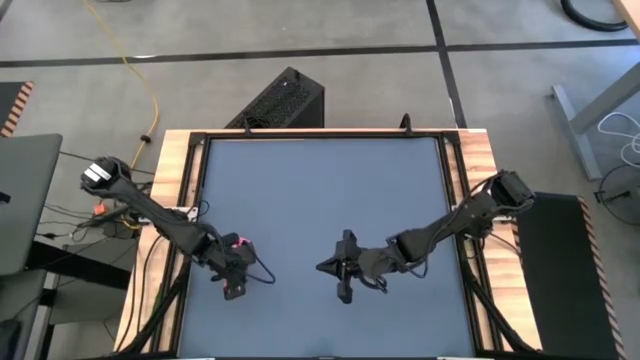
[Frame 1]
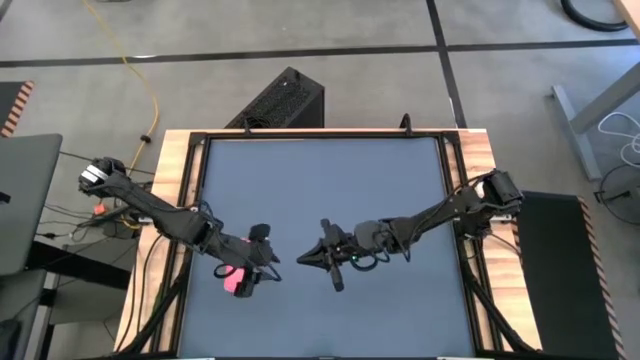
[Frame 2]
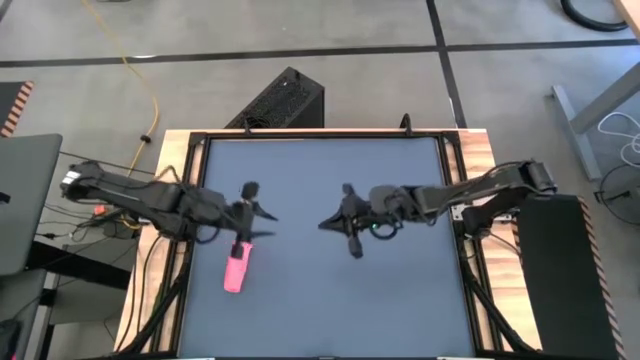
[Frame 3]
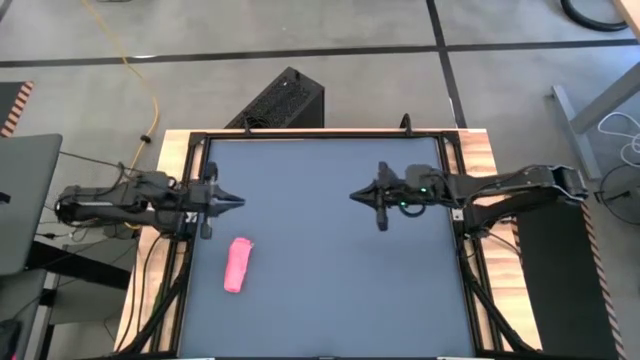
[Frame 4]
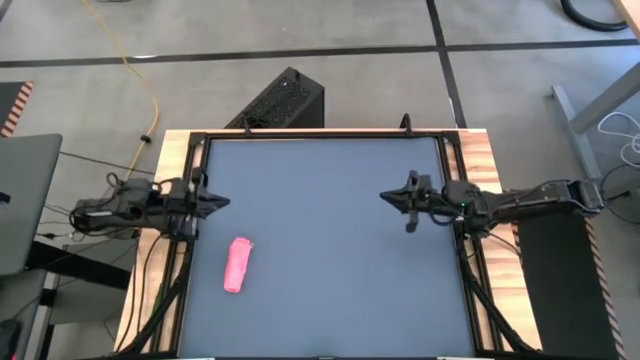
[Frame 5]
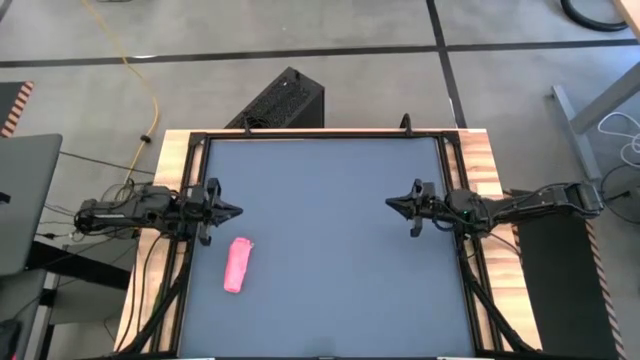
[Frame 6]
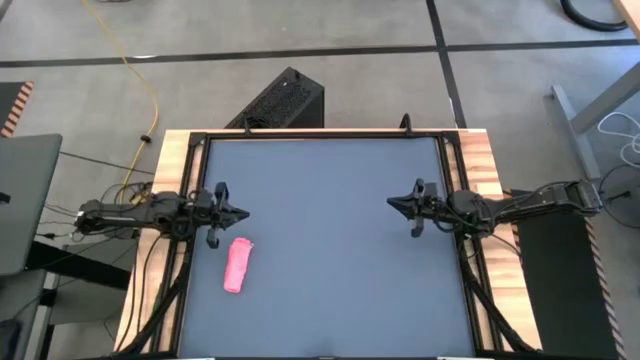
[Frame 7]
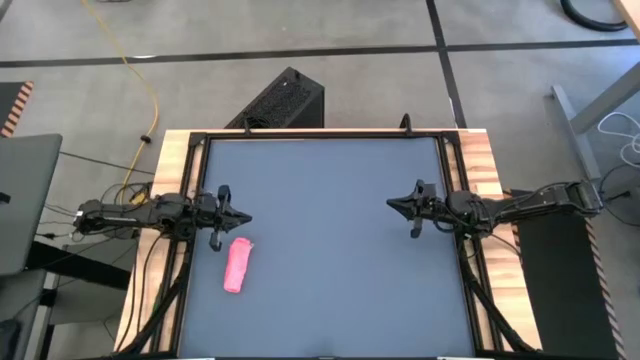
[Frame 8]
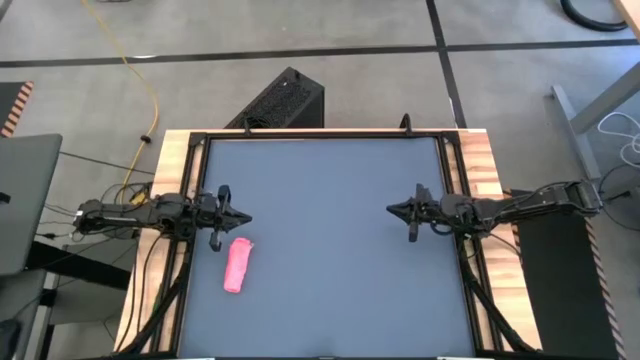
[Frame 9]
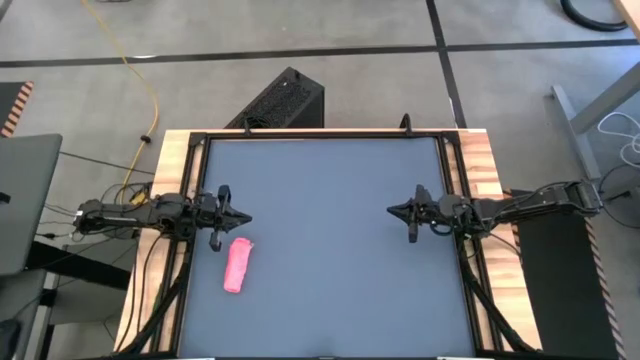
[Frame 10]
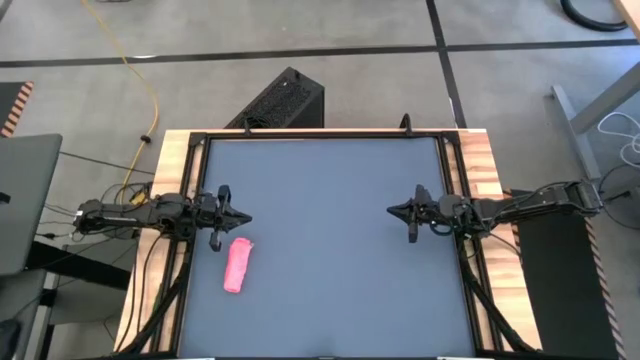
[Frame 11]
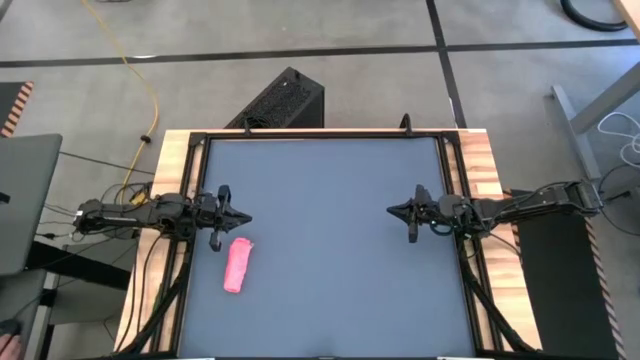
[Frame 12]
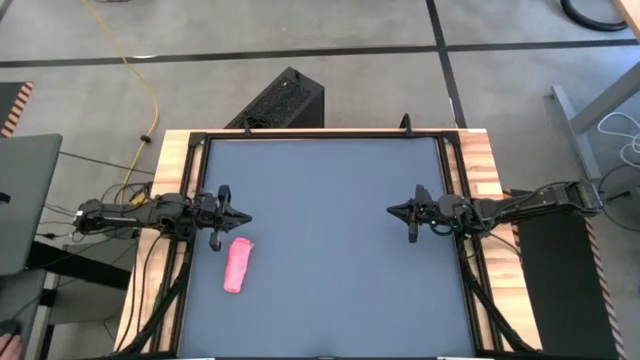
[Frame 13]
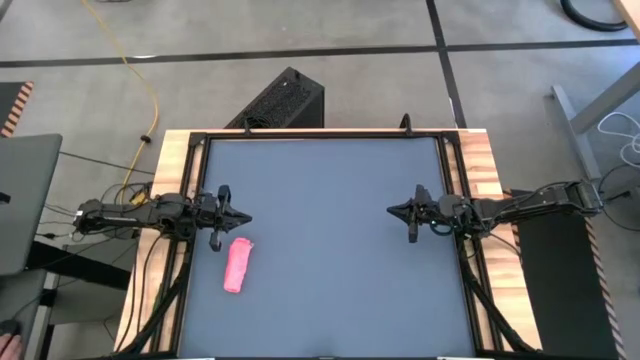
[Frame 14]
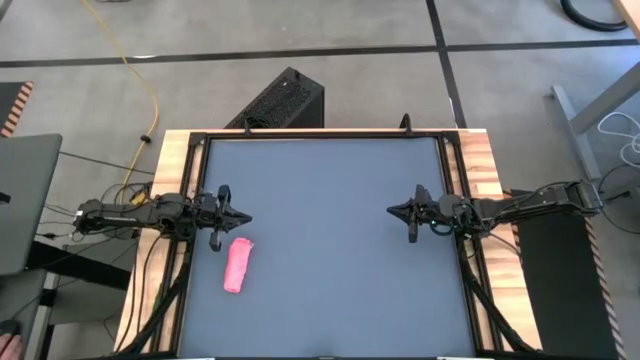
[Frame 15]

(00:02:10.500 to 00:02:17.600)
Task: Roll towel
Return to Home Position

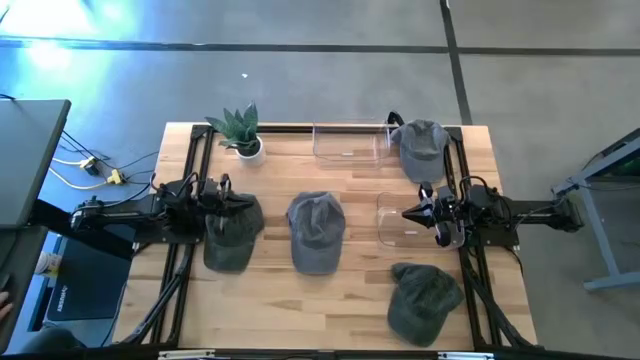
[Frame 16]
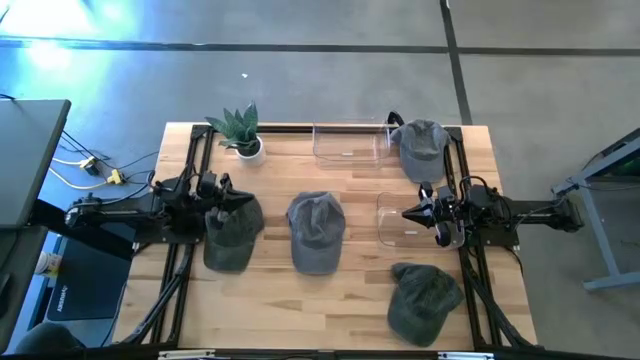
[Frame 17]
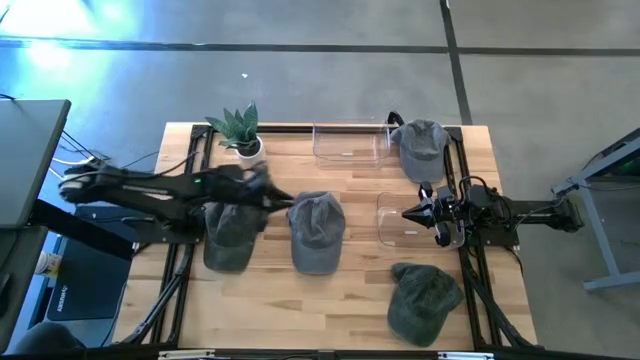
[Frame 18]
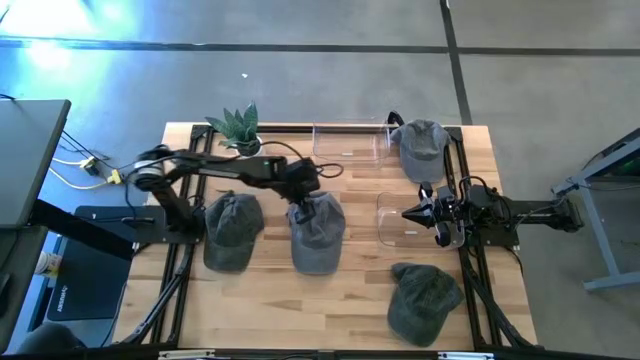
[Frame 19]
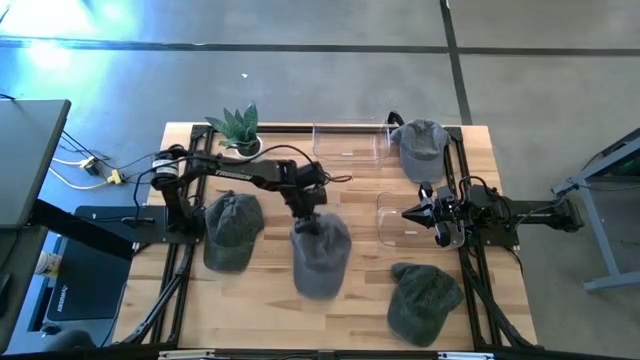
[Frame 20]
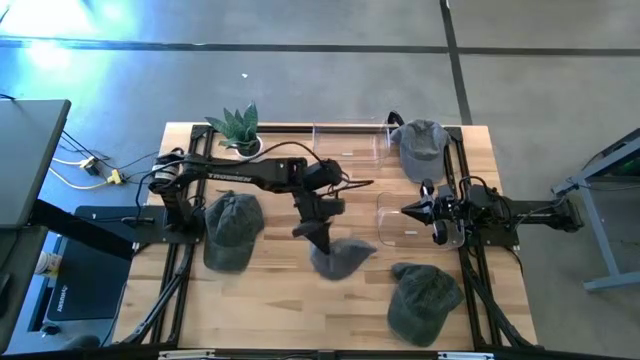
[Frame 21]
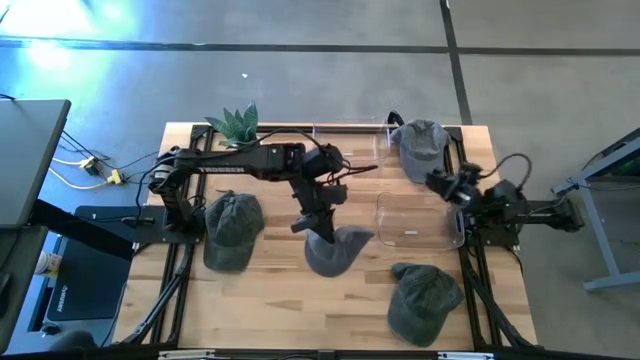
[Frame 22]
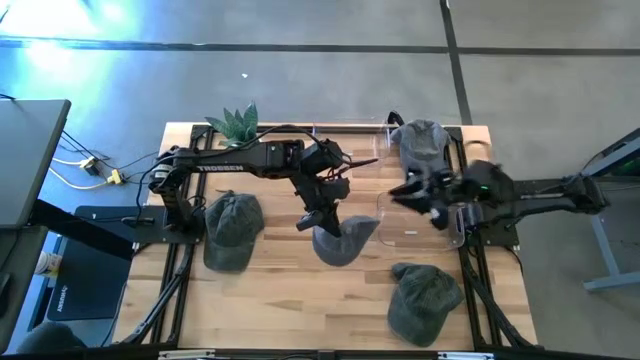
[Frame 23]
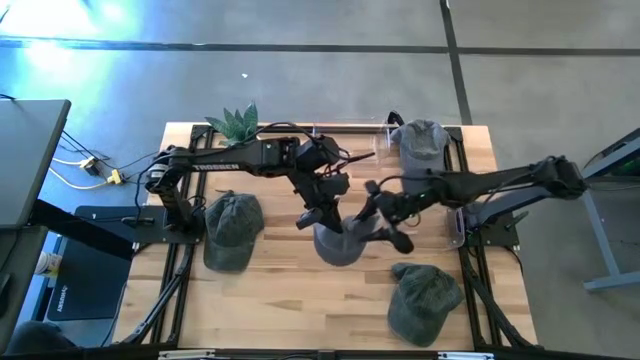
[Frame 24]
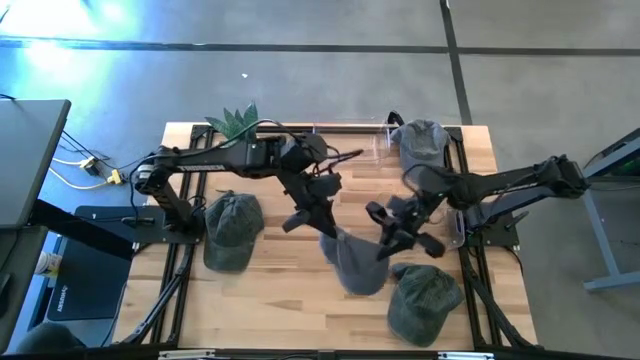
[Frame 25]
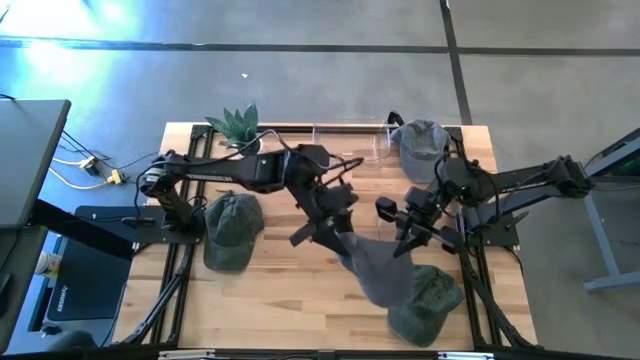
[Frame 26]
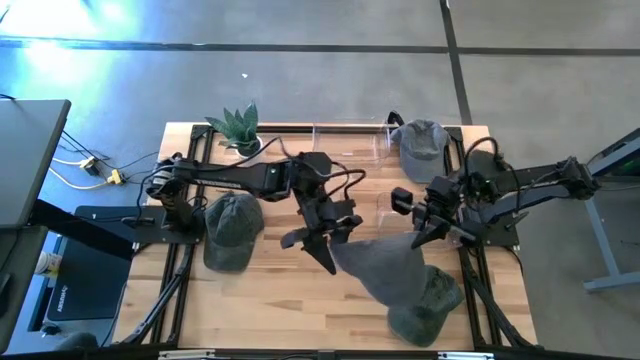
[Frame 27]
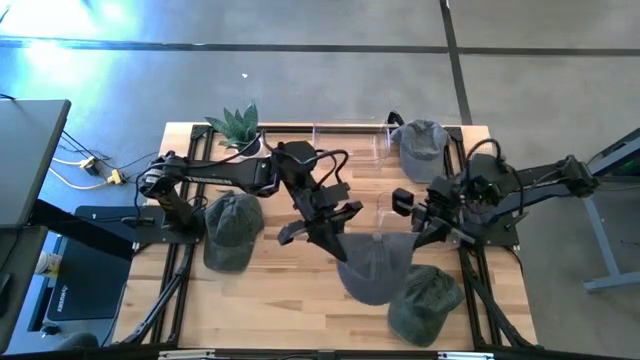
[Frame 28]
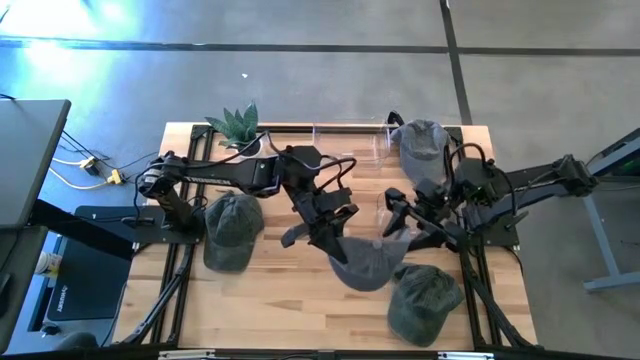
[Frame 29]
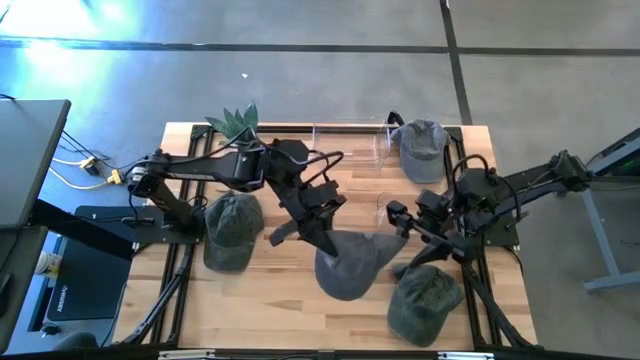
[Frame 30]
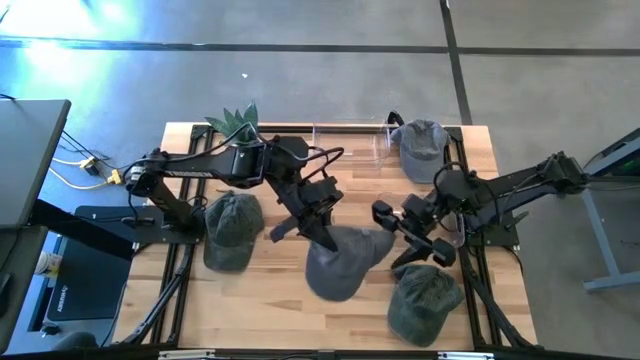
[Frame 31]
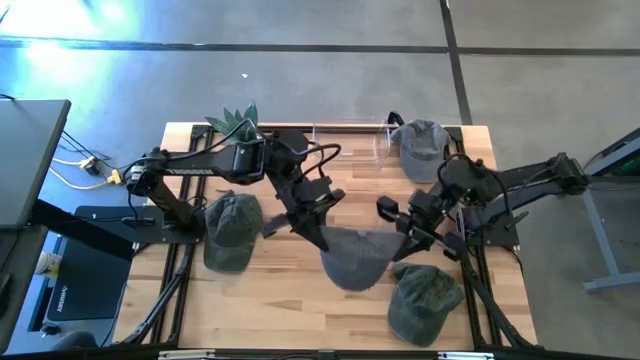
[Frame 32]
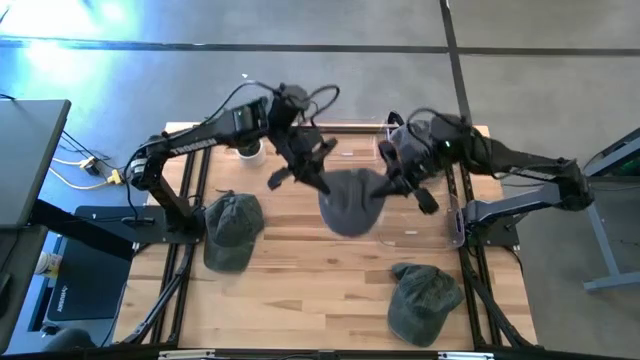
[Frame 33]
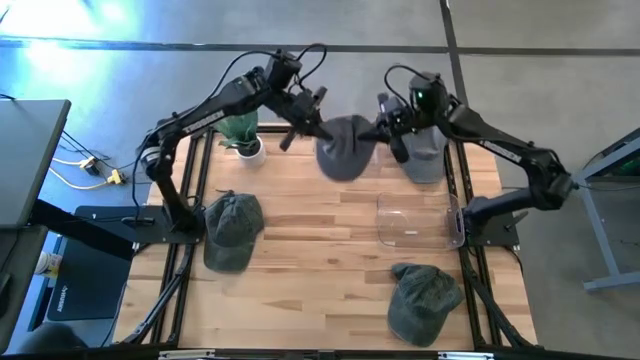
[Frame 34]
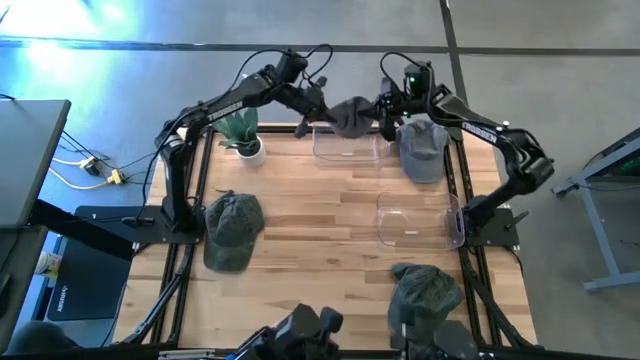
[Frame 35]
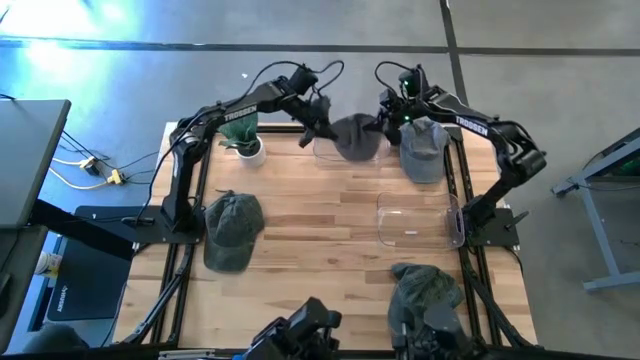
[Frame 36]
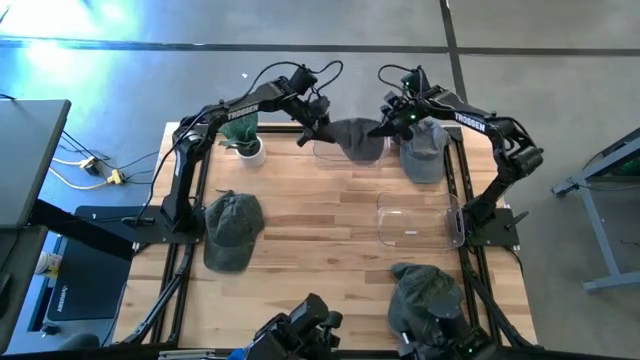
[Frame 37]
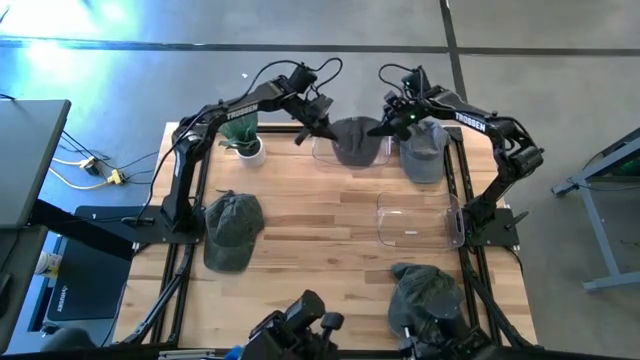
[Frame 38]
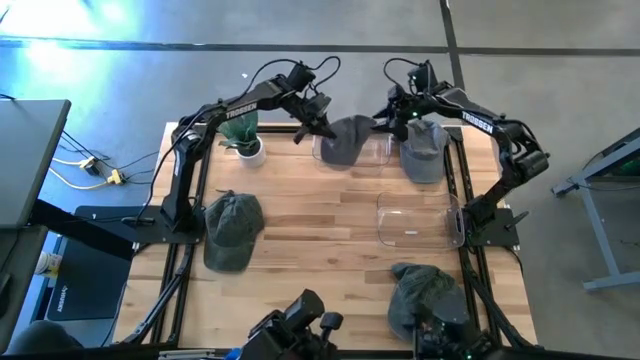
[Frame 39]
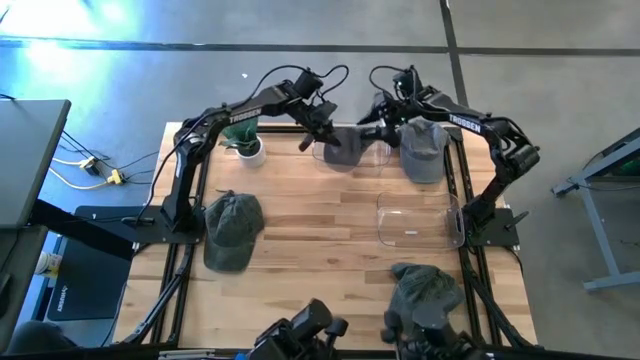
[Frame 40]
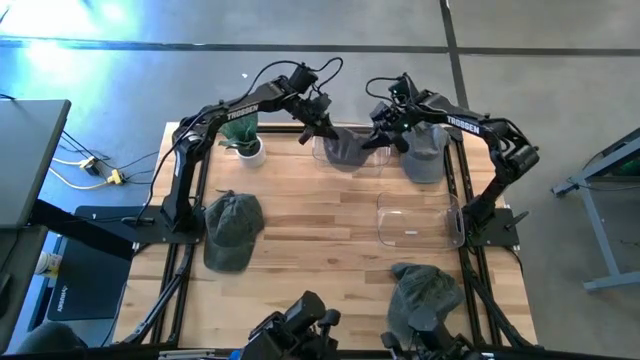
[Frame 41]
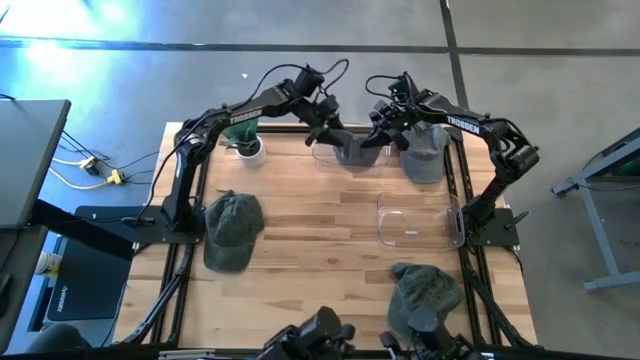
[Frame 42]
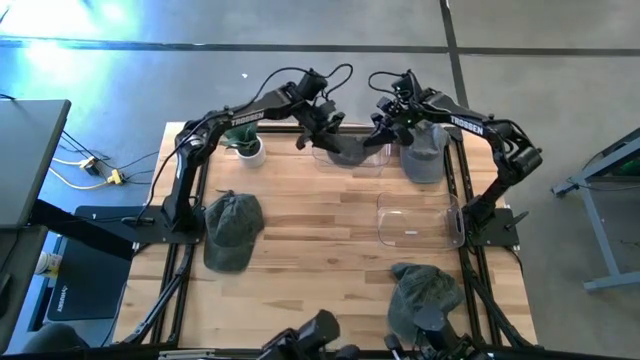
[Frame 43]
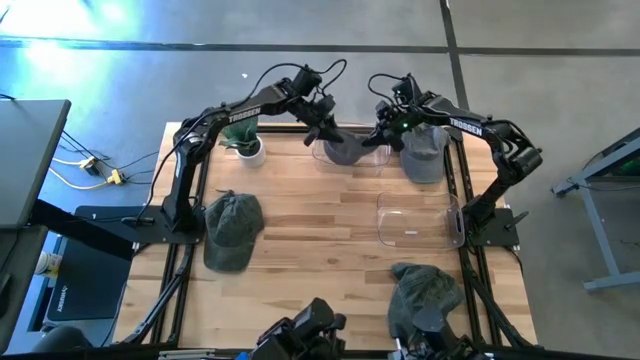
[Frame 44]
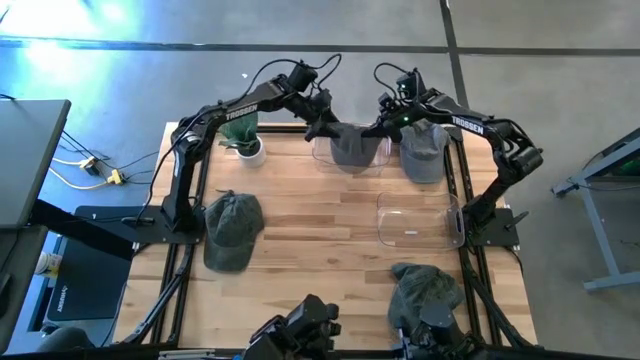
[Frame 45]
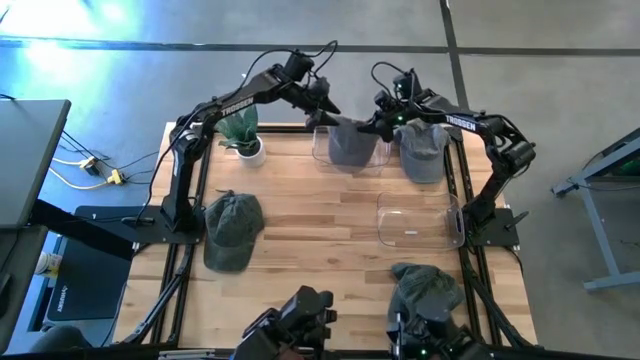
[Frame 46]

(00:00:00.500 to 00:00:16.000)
Task: Pick & Place hat
Put the bottom gray cap into the top transparent bin
